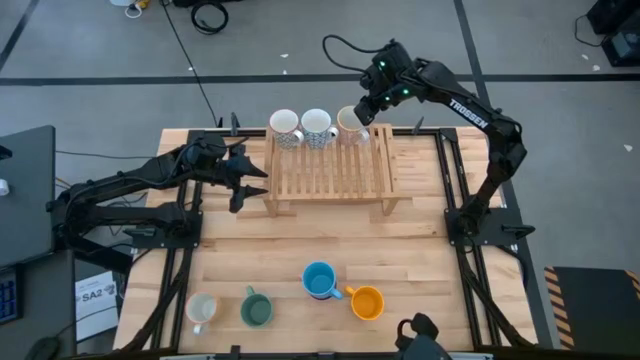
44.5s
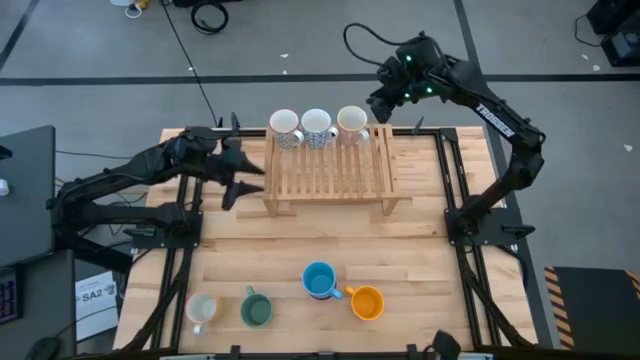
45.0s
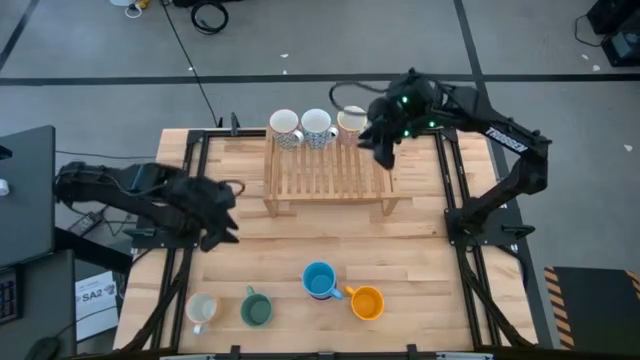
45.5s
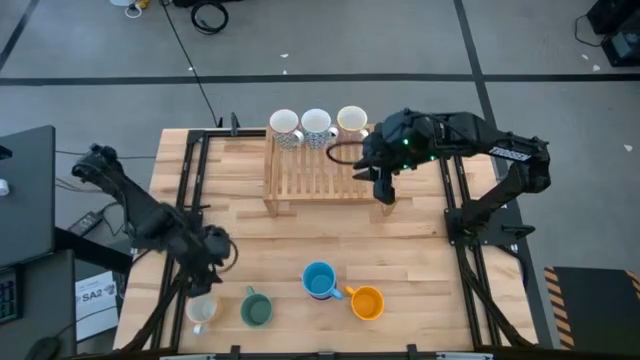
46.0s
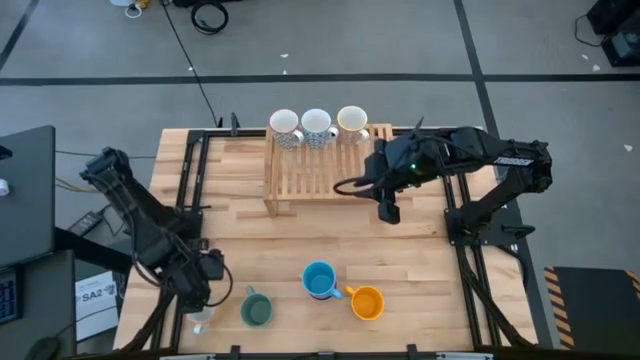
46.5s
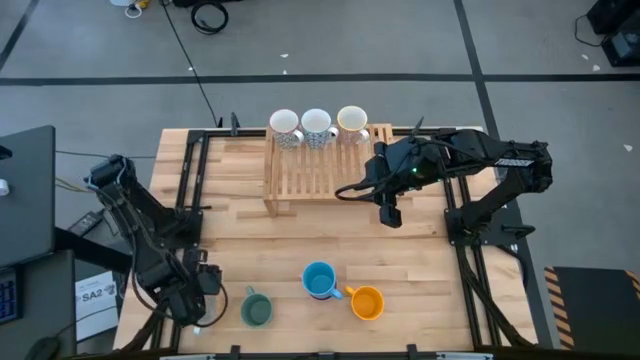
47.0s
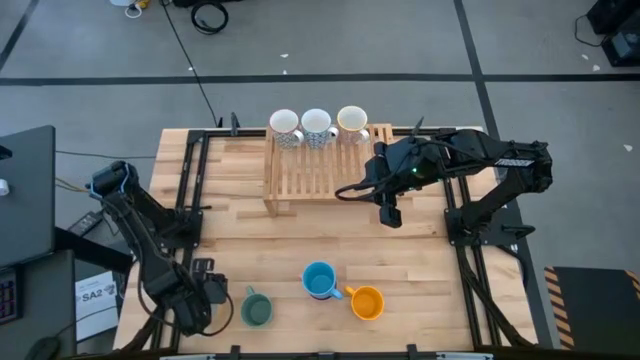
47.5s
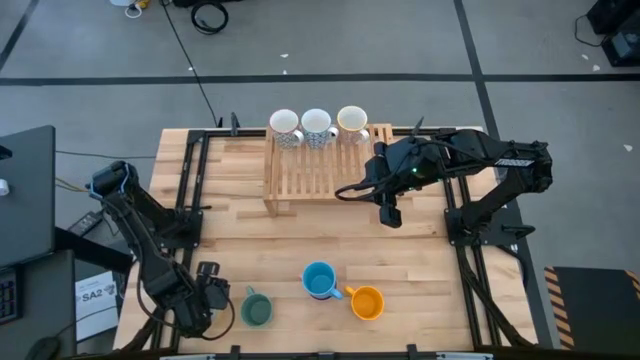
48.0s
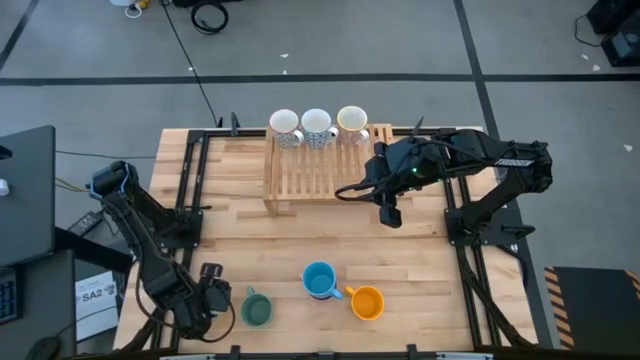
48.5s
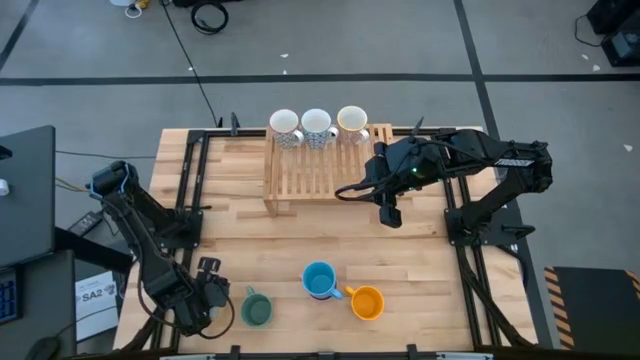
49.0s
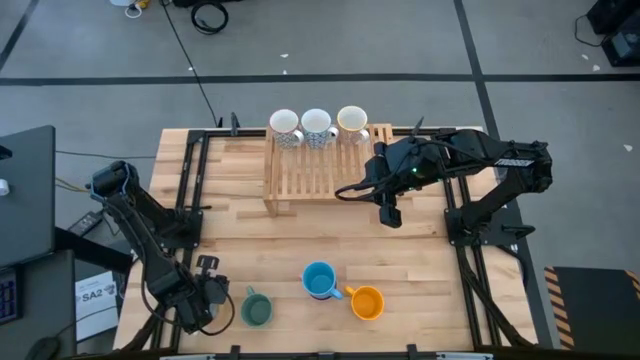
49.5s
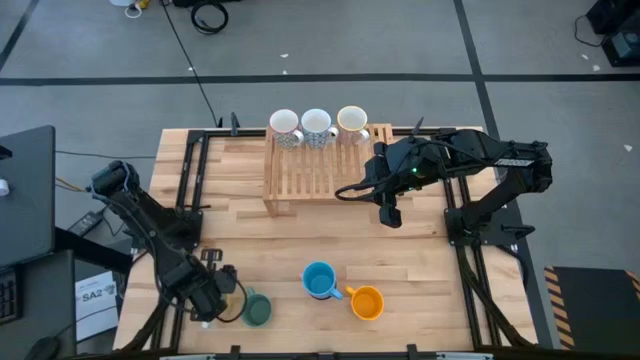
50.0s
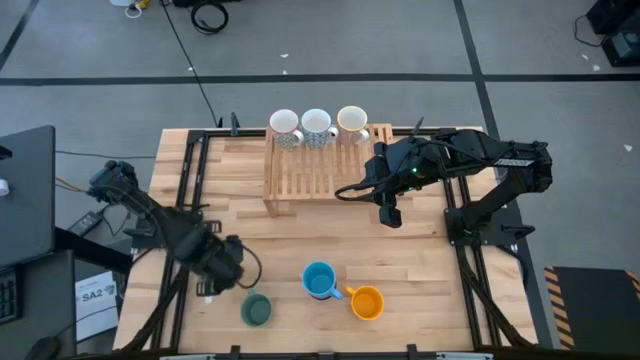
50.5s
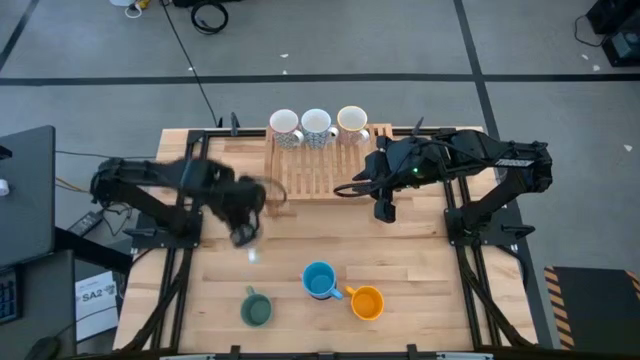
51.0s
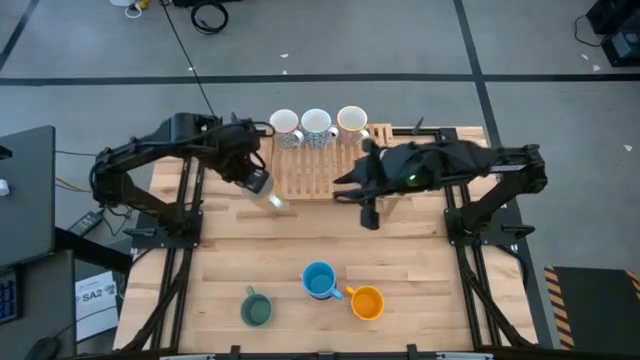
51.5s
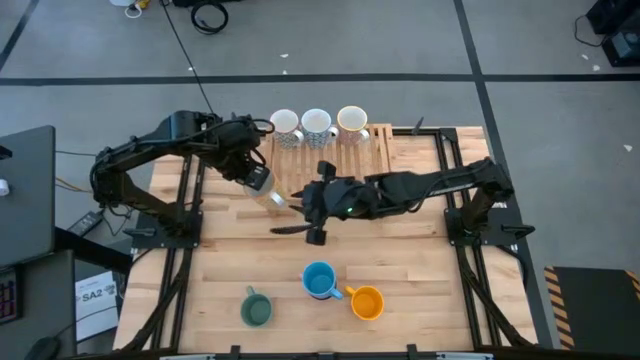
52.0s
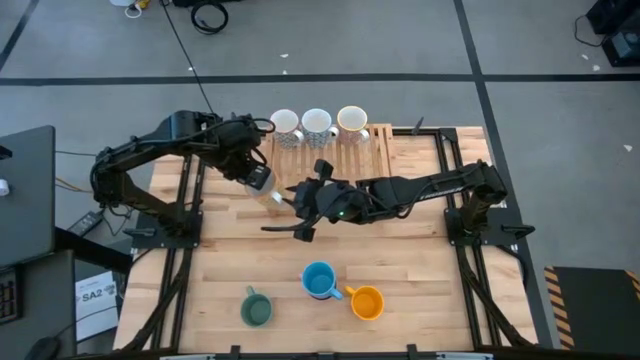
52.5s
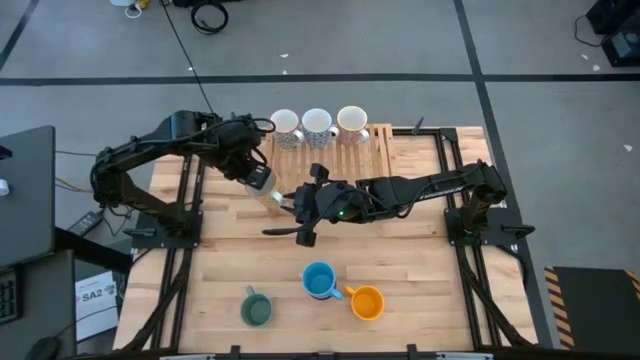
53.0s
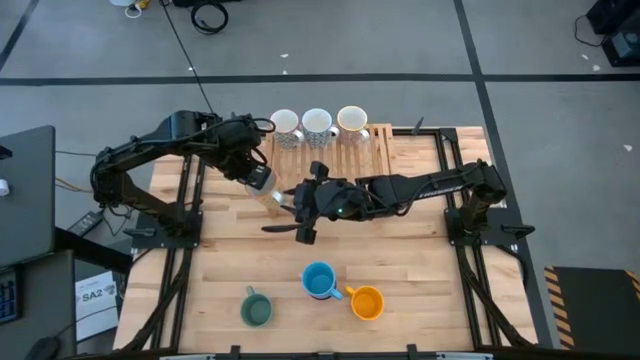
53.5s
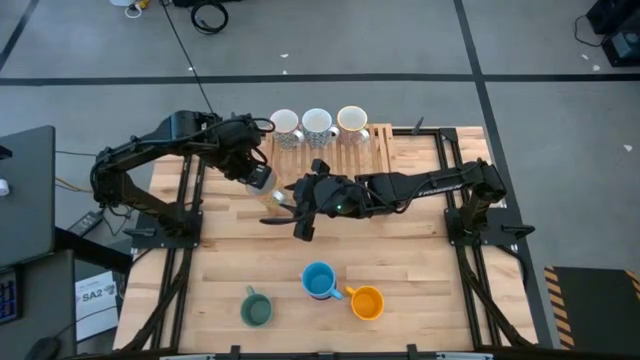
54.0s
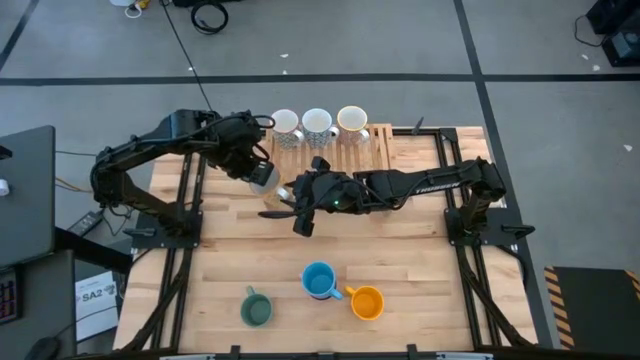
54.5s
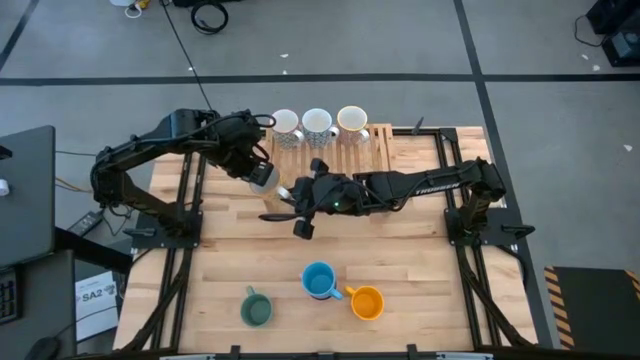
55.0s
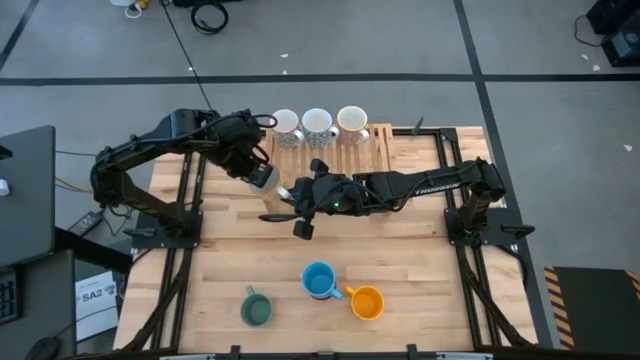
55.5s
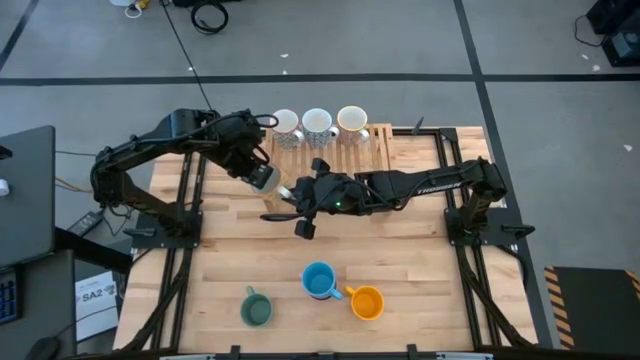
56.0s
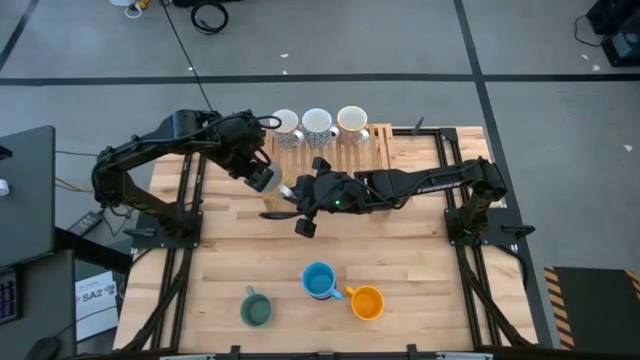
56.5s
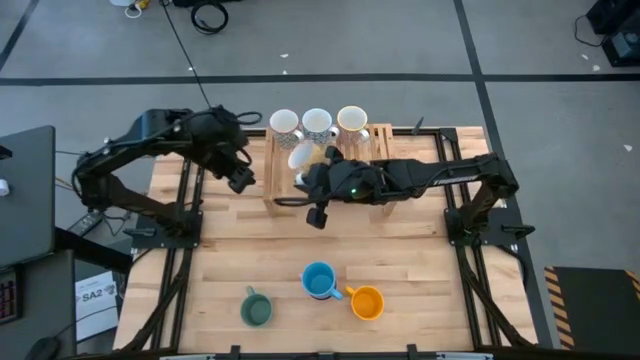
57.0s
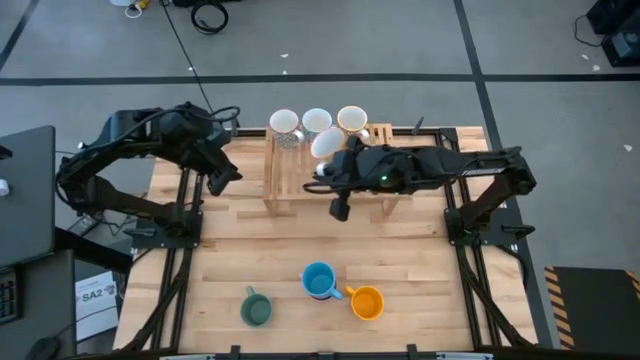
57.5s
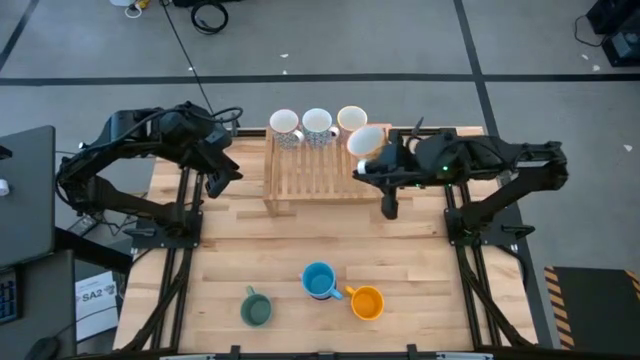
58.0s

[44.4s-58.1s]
Task: Place coffee mugs
Put the left yellow mug on the shelf

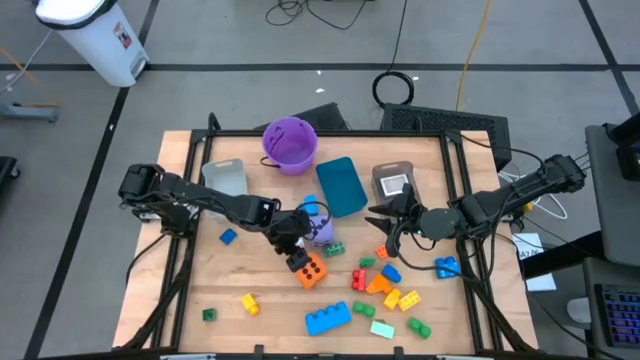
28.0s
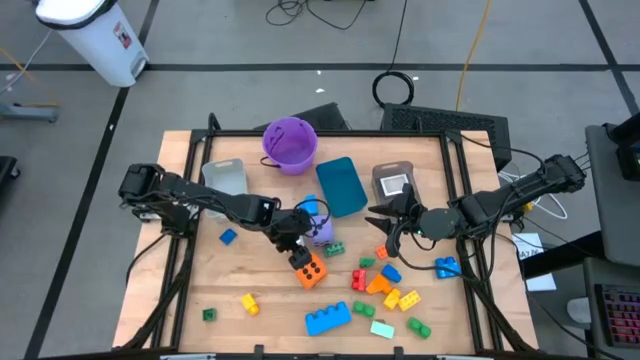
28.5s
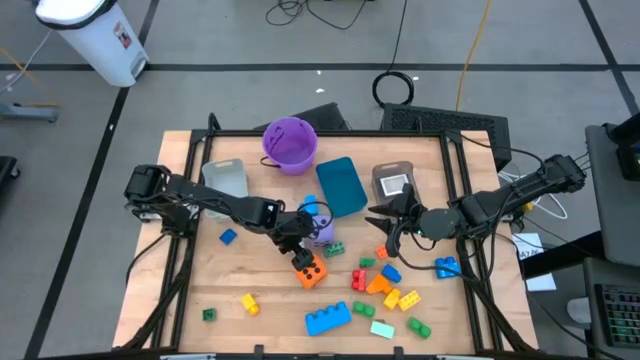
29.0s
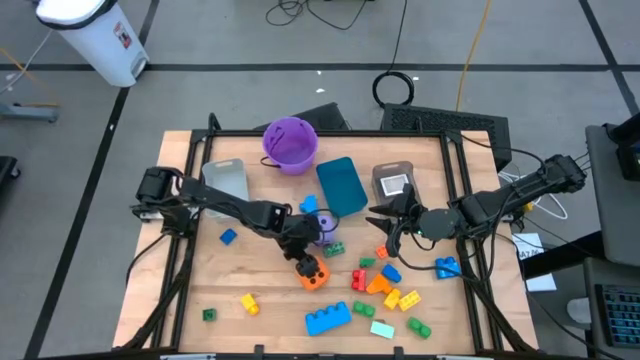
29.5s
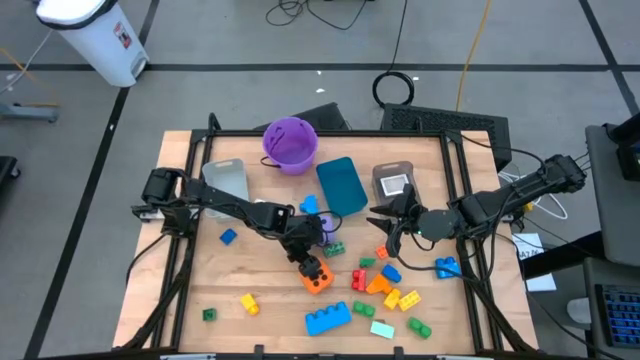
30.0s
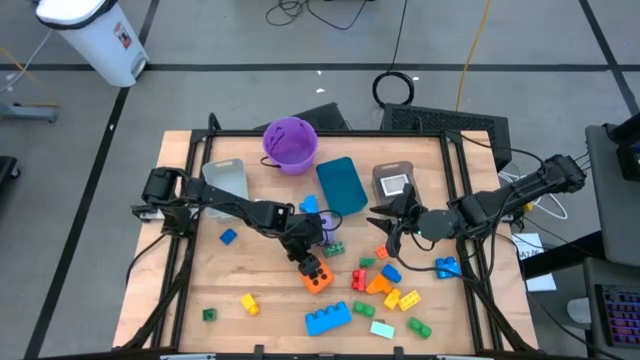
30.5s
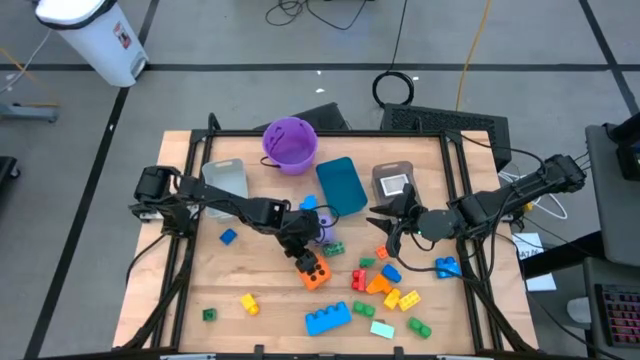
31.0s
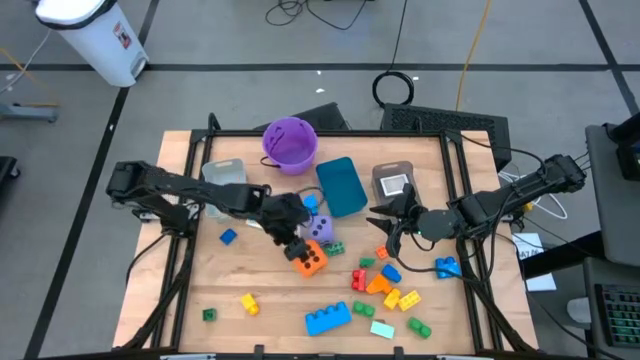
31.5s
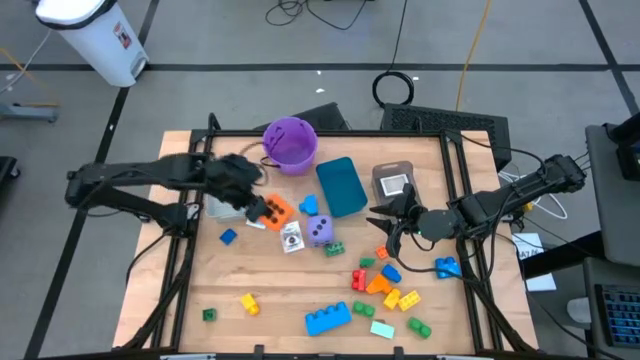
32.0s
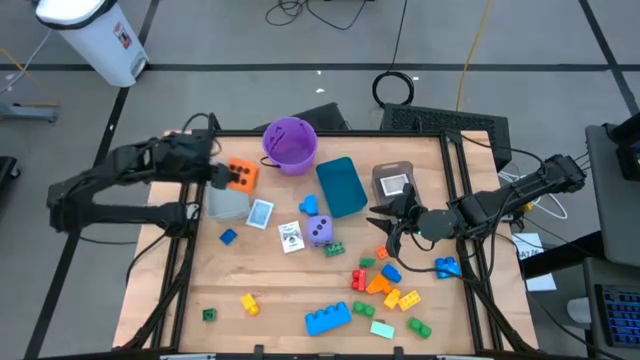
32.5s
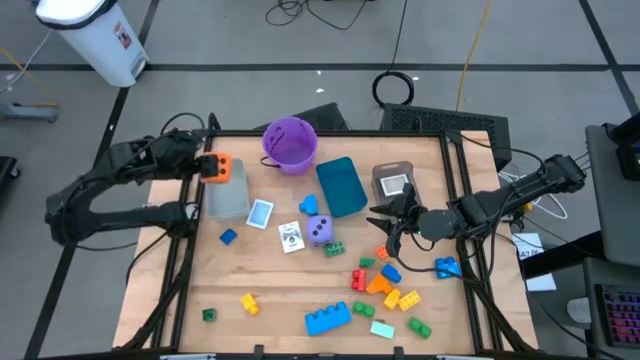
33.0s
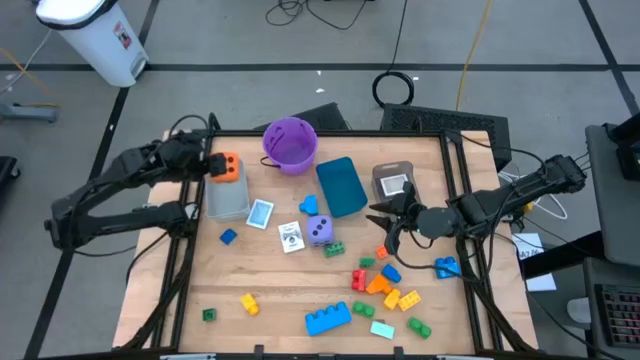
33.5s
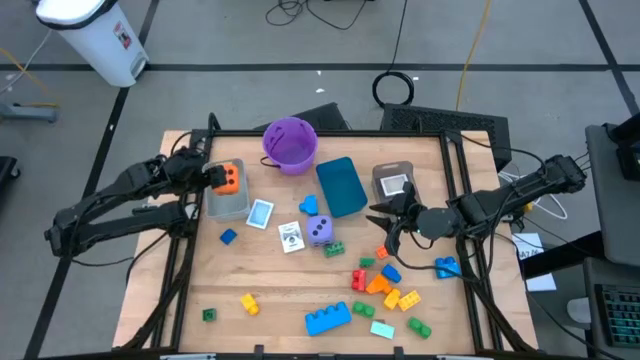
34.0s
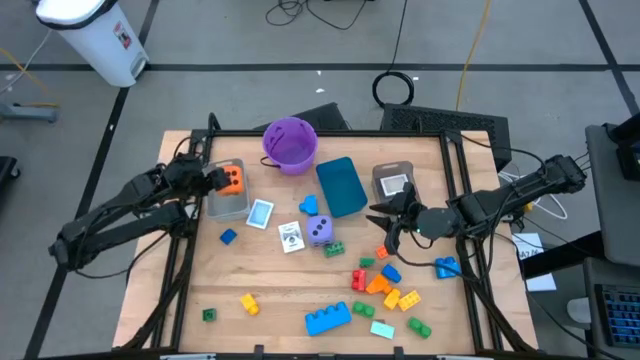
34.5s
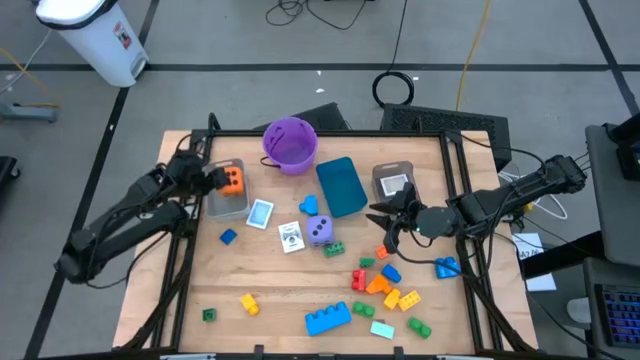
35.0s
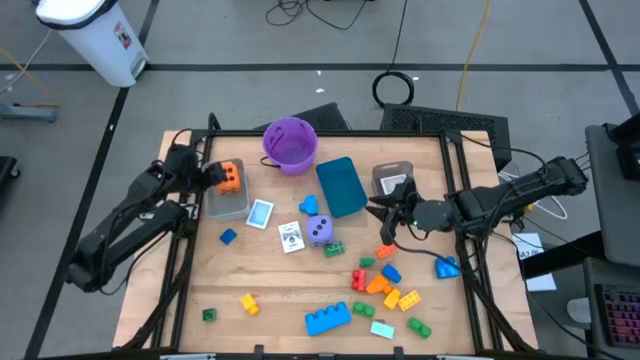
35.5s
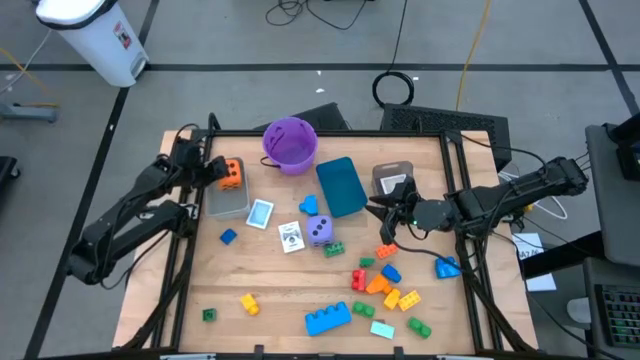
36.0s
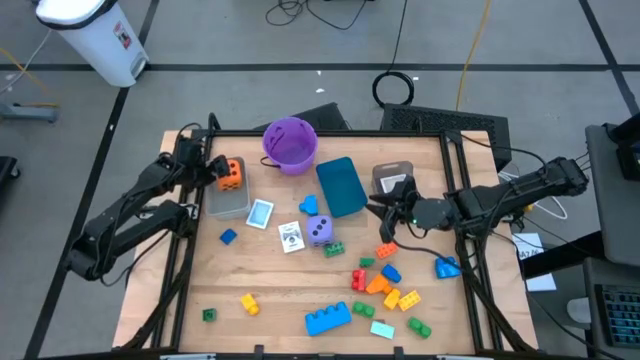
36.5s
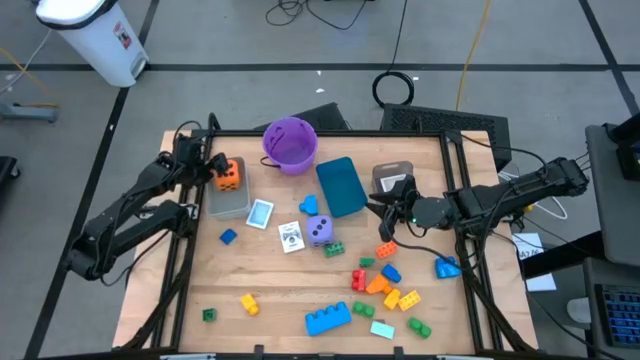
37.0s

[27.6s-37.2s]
Task: Pick & Place Toys
Put the orange die into the gray bin
